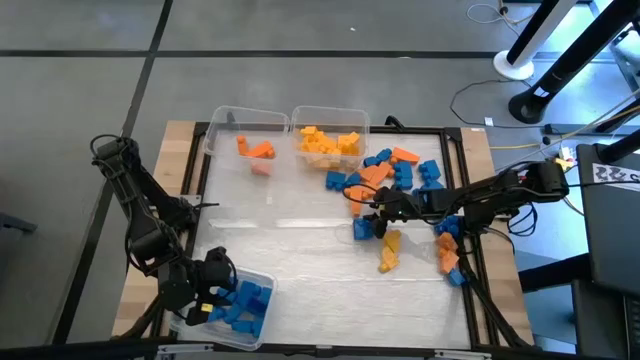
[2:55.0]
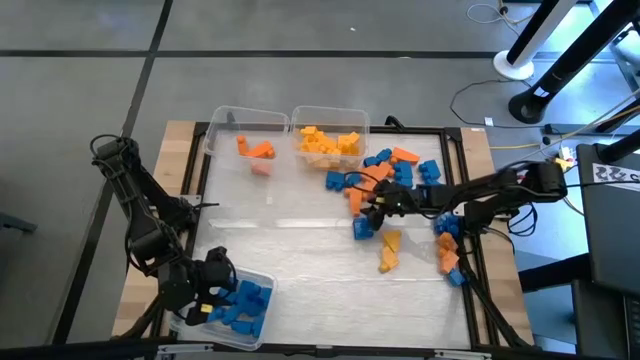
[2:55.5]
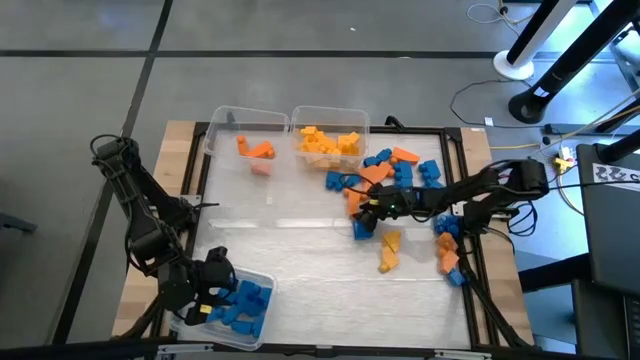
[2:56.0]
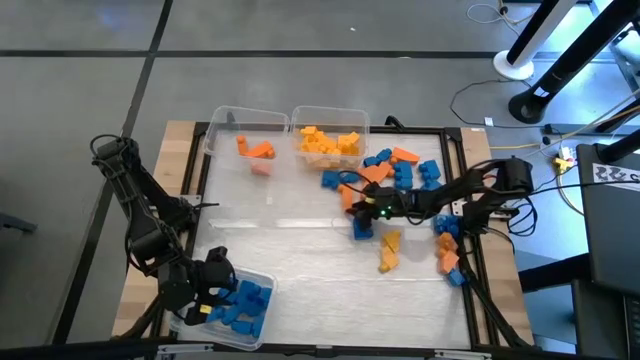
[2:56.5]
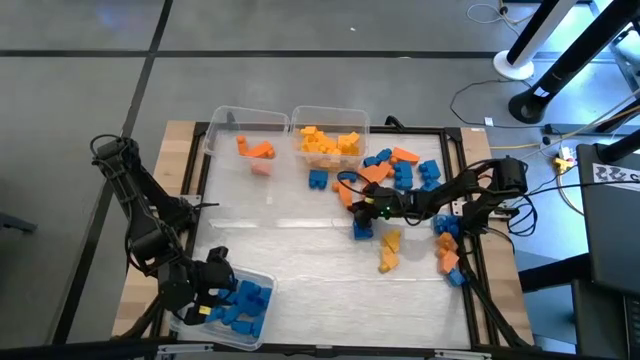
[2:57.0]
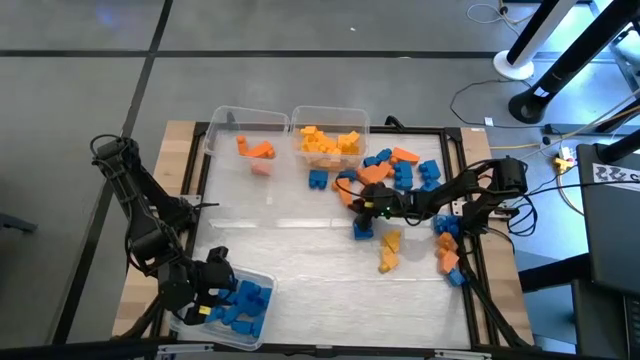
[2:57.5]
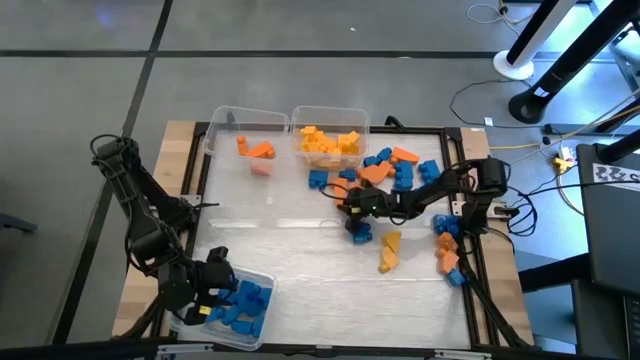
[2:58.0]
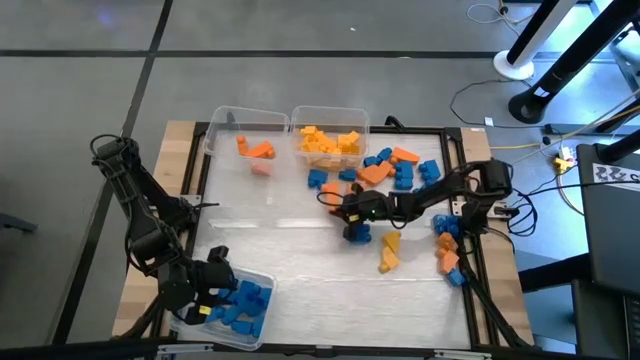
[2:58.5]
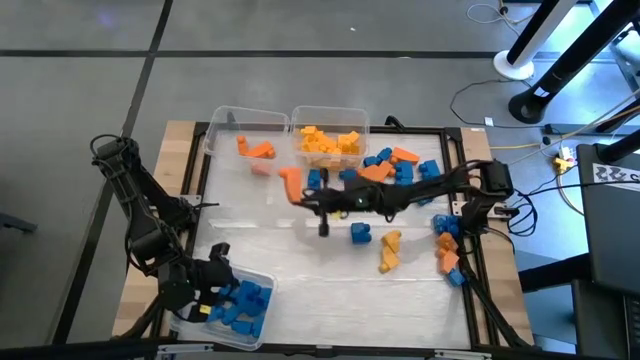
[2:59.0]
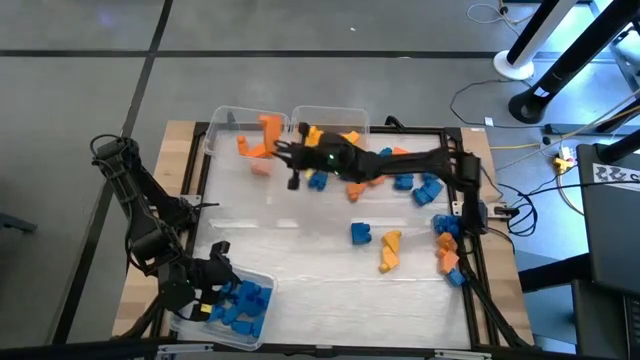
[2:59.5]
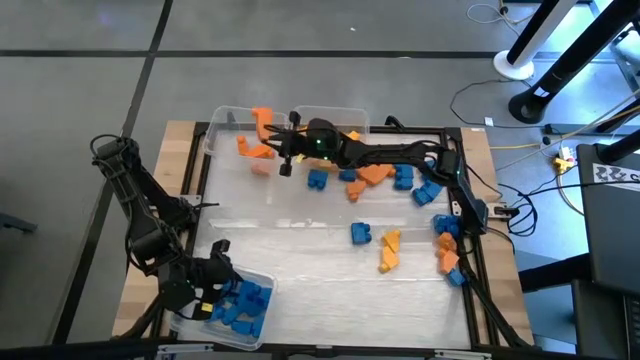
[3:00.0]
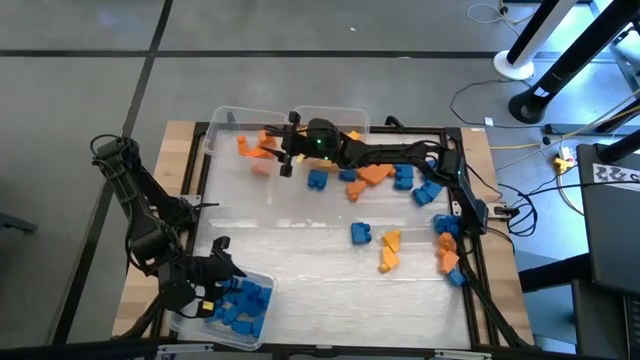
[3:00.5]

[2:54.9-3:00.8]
Task: Sort blocks
Put the orange game piece into the top left transparent bin

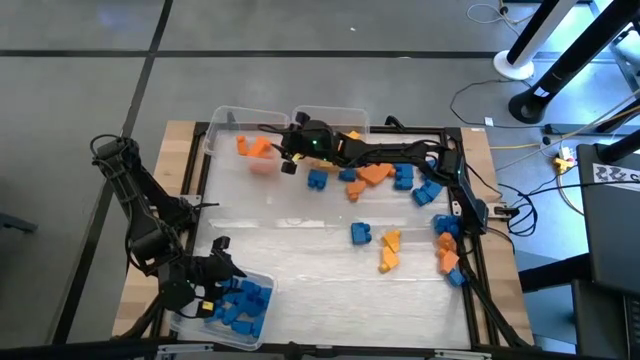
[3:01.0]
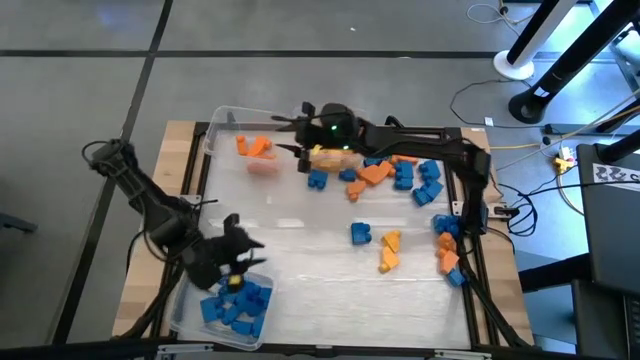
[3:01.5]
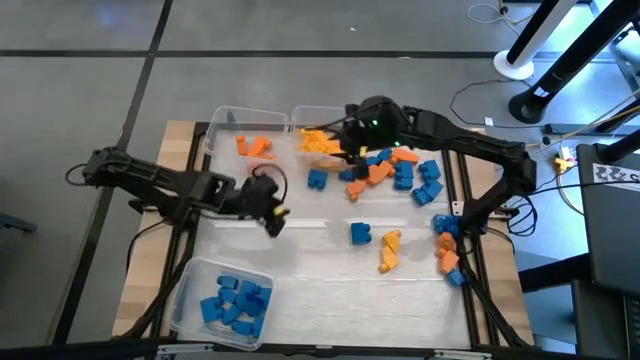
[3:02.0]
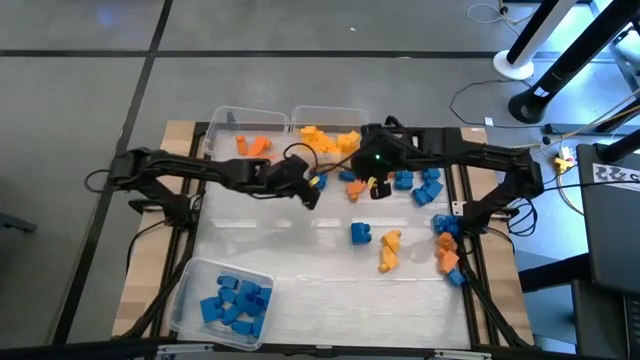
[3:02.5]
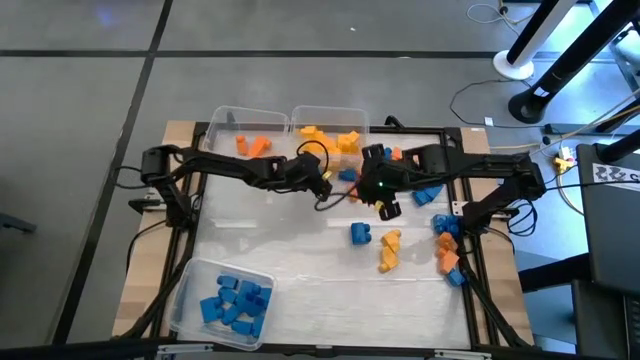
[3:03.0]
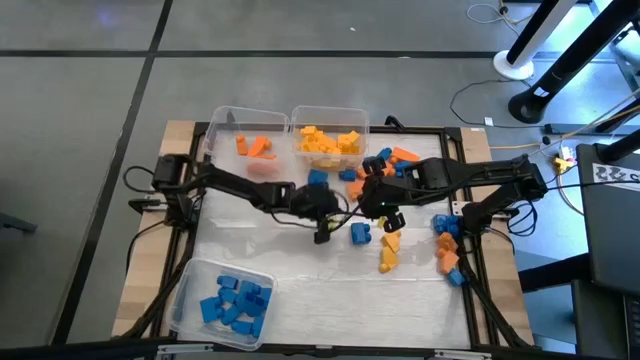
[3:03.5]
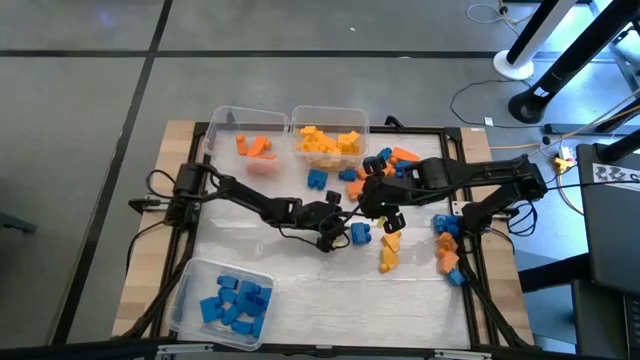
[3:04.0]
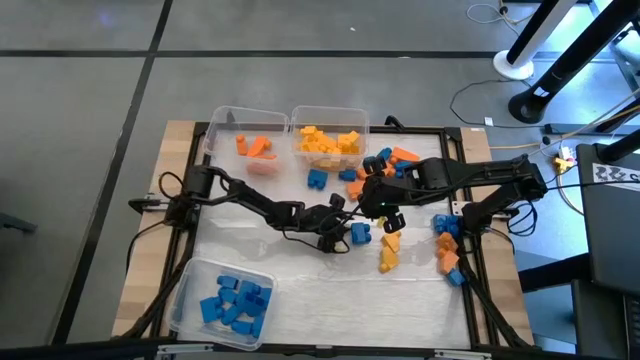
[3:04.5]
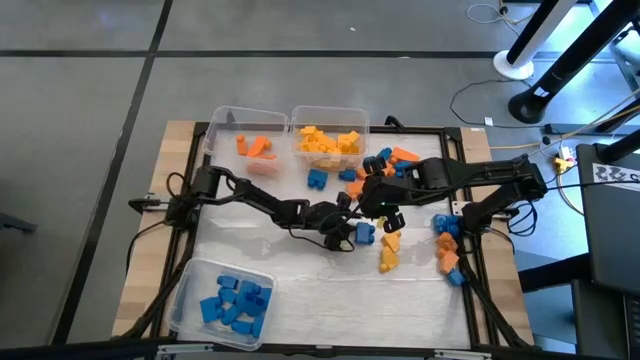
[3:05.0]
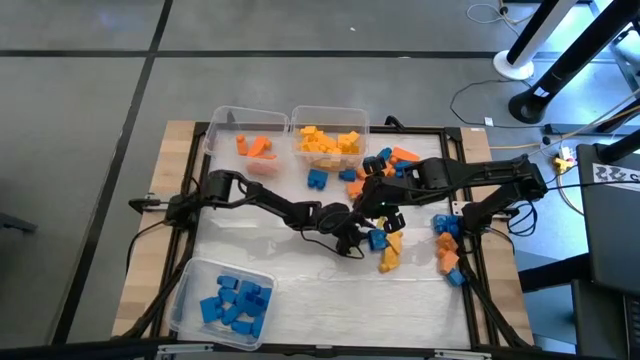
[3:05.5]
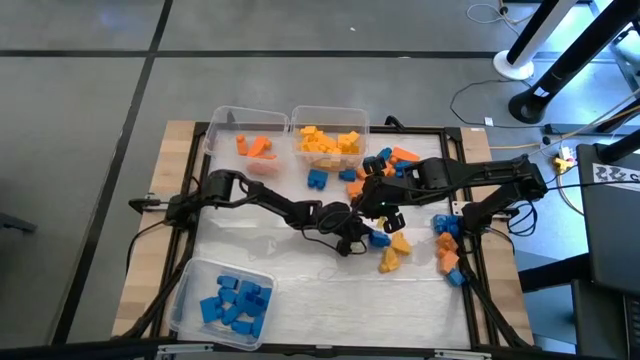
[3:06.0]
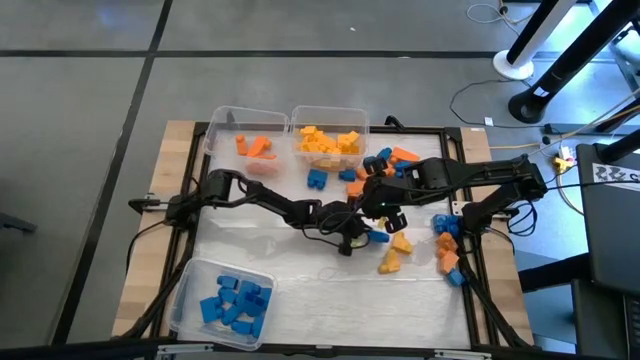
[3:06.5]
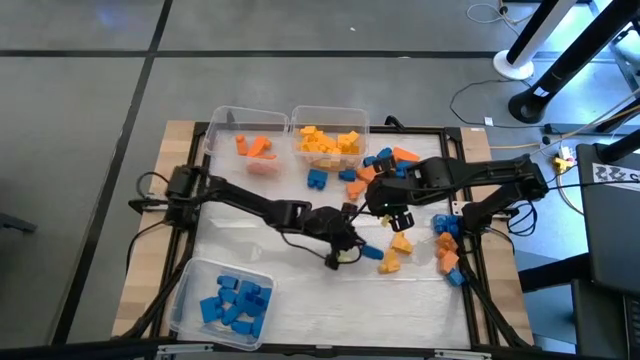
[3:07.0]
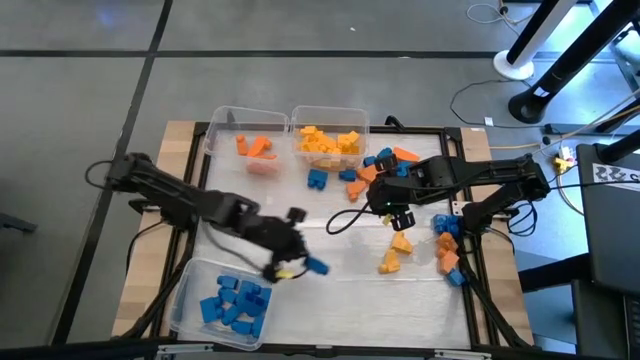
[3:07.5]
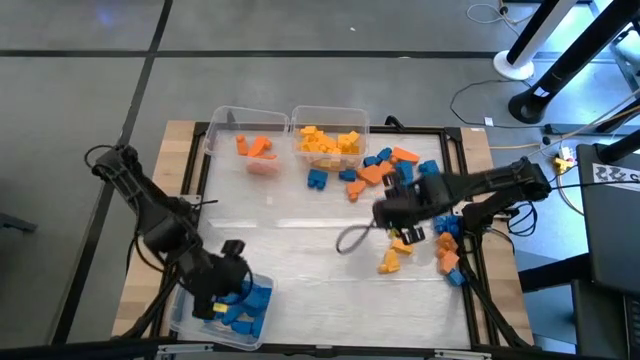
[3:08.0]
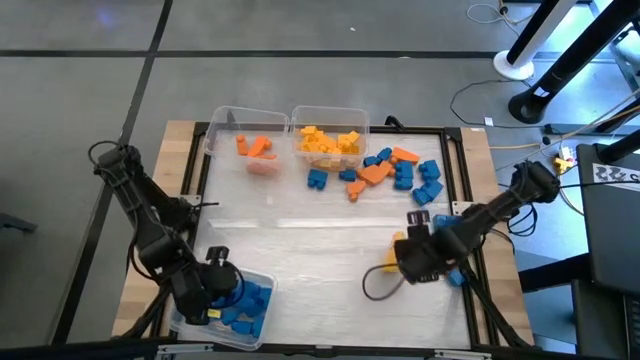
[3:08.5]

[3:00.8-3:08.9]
Put the blue game piece into the bottom transparent bin

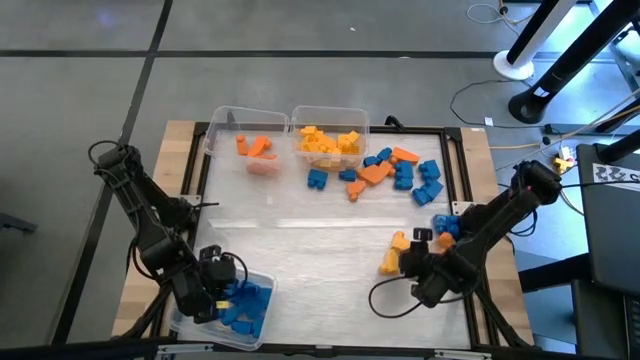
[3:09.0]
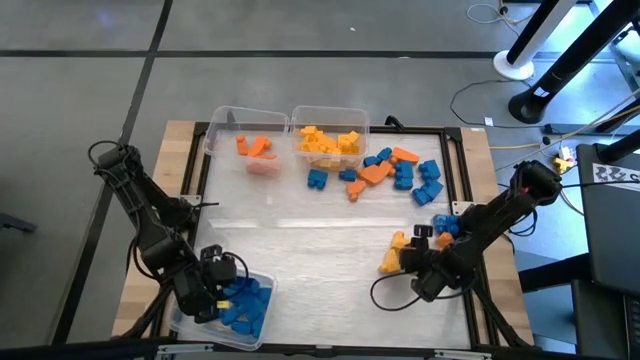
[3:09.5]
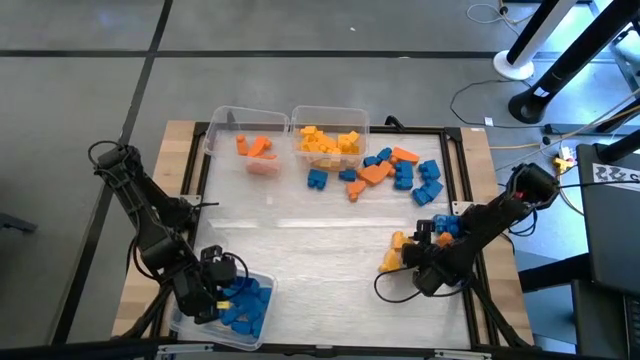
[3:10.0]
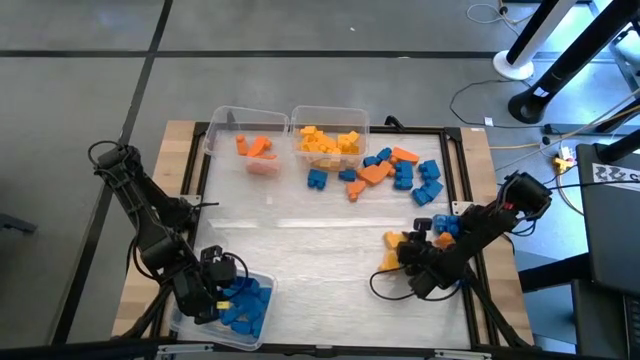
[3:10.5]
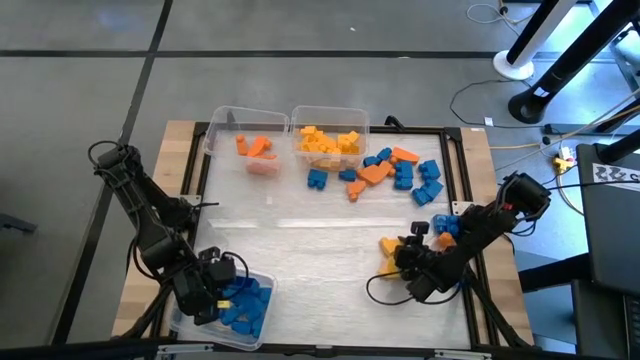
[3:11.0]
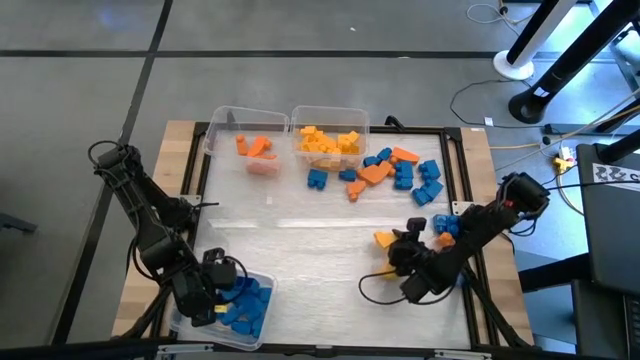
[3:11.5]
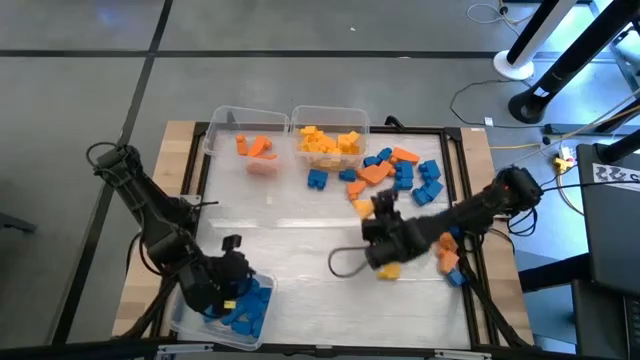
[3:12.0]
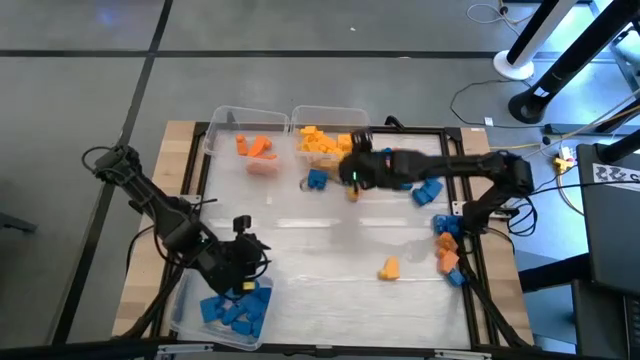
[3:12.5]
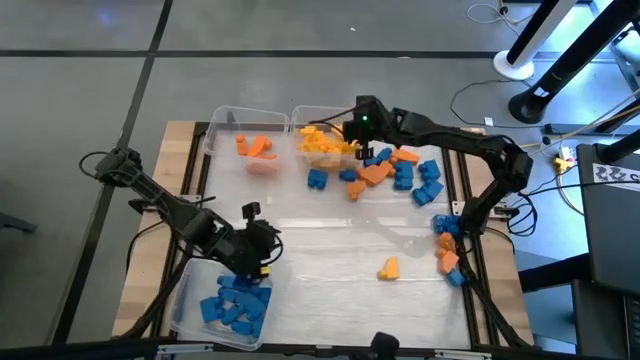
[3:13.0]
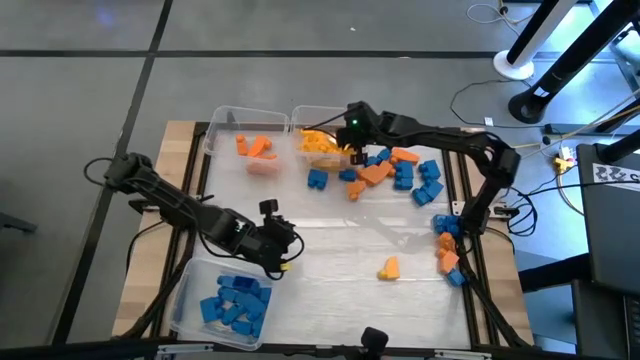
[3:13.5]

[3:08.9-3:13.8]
Put the yellow game piece into the top right transparent bin

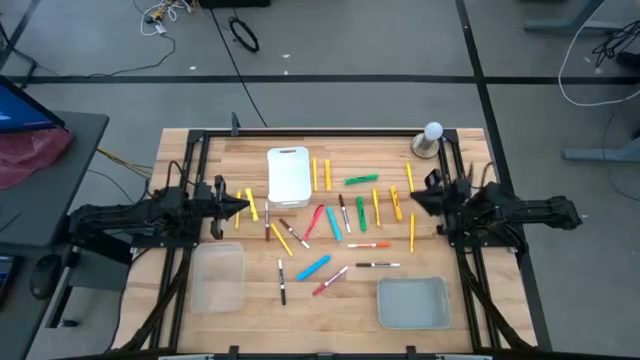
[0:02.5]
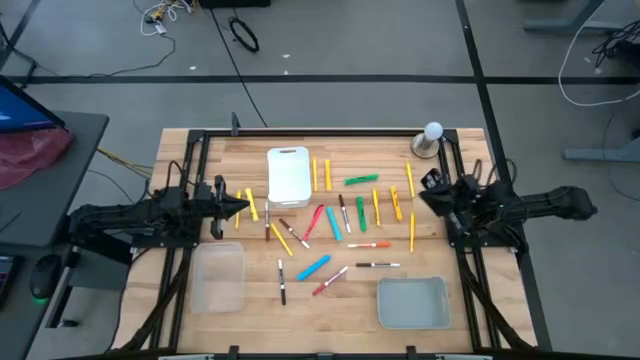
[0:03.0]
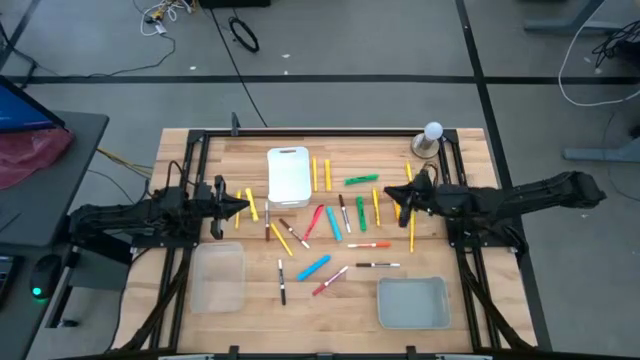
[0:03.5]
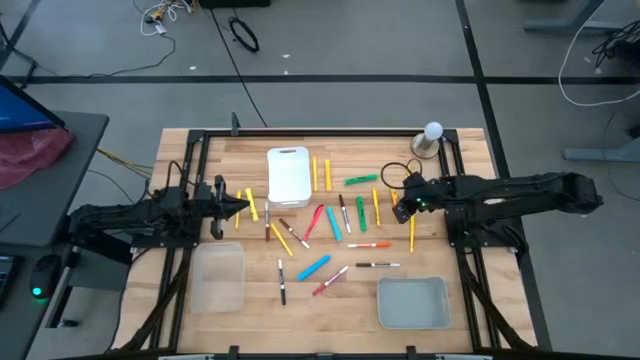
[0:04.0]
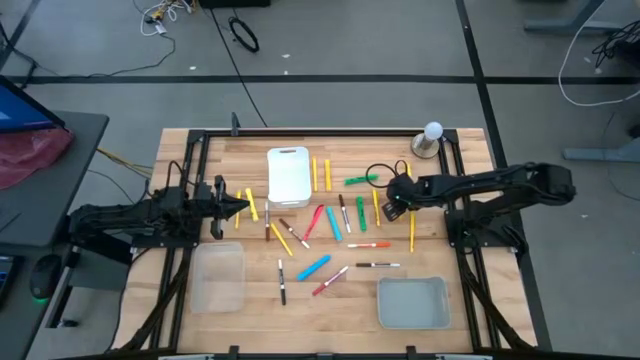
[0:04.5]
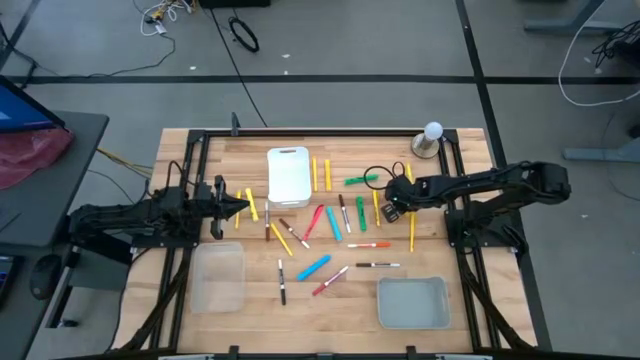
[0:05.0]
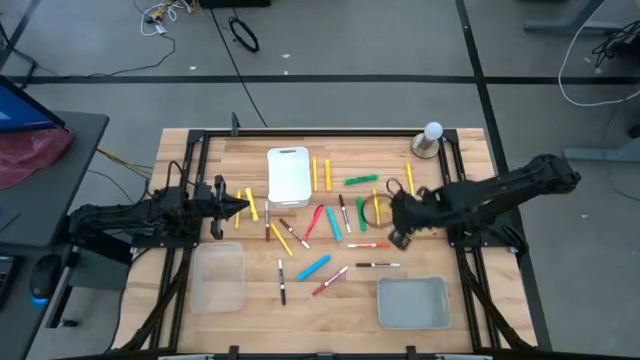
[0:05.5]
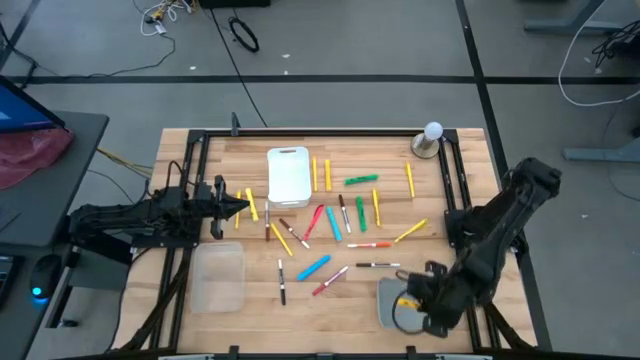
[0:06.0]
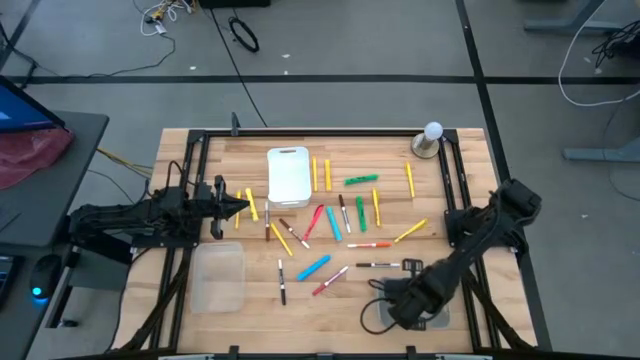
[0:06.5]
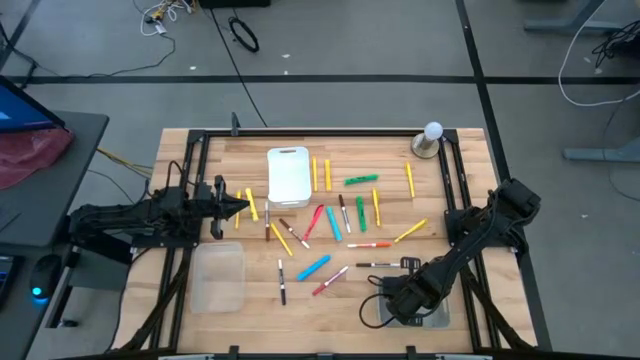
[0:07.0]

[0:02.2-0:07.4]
Task: Pick & Place Markers
Put the yellow highlighter pen into the gray bin
